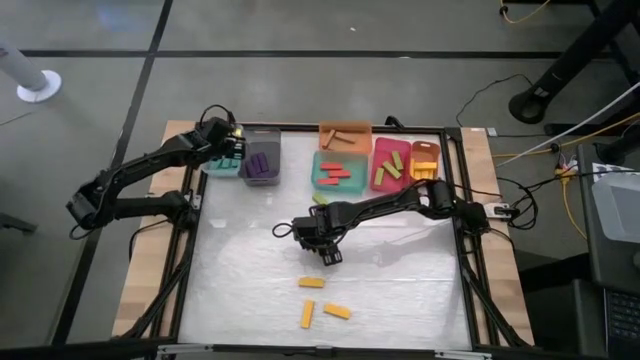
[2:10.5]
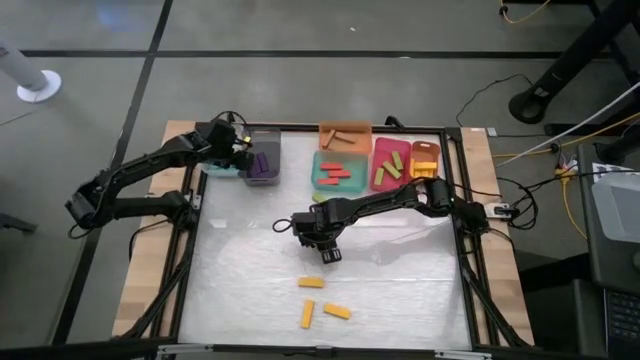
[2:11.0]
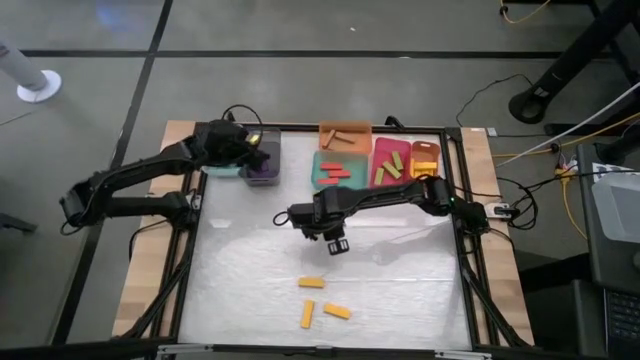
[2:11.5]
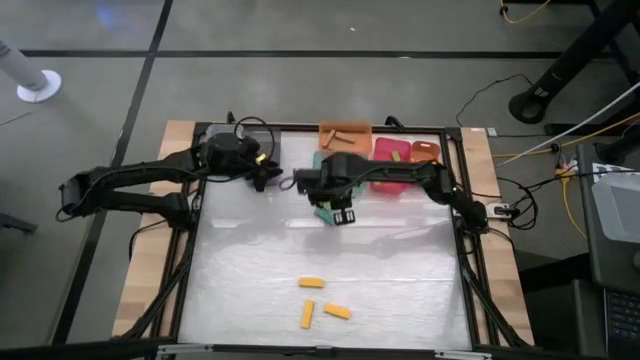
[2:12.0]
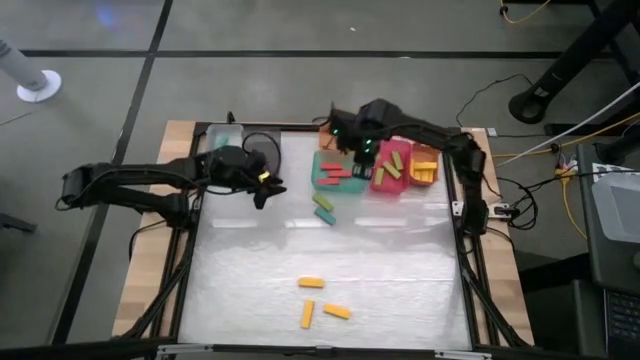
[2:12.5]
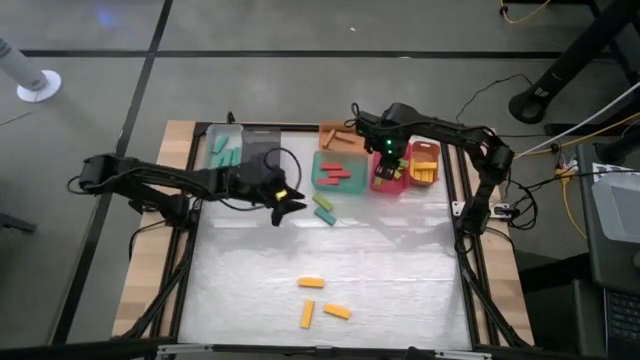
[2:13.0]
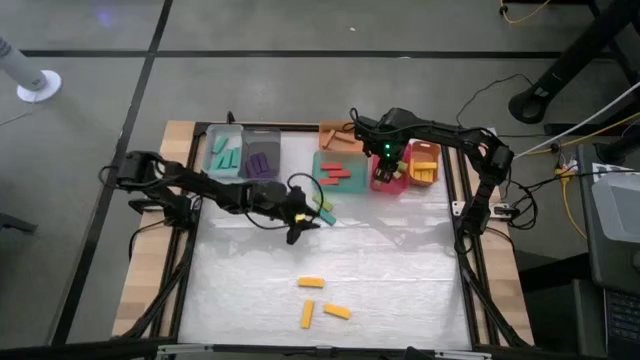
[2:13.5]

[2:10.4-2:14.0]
Task: Sort blocks
Put the light green block into the pink bin

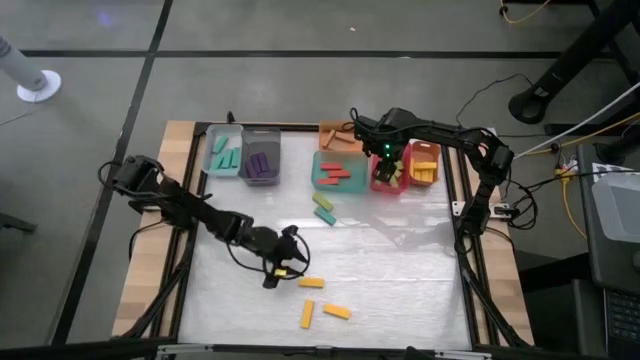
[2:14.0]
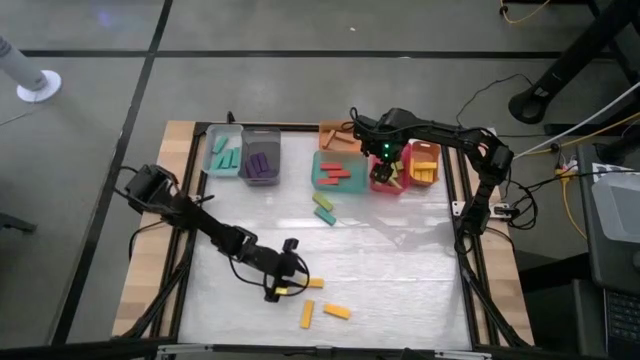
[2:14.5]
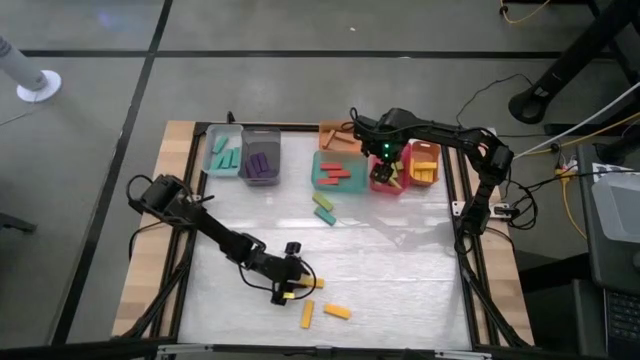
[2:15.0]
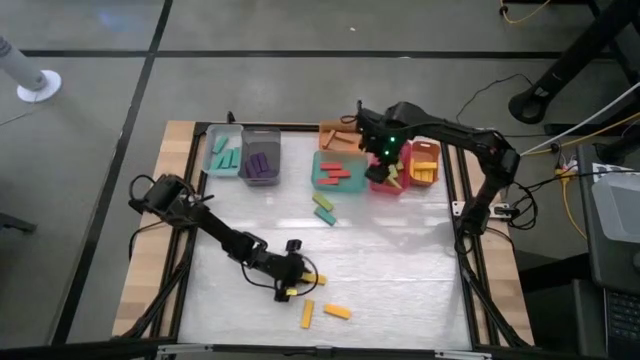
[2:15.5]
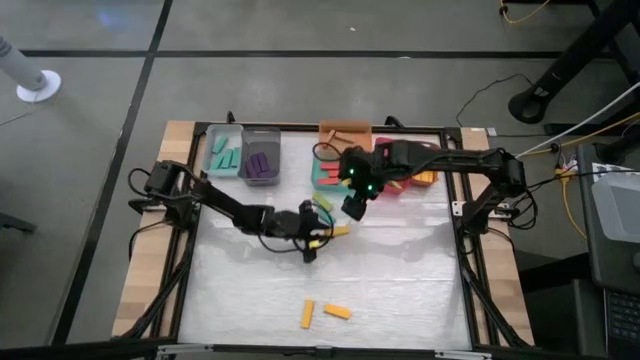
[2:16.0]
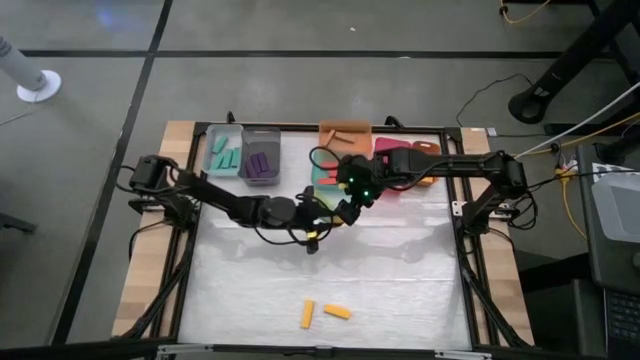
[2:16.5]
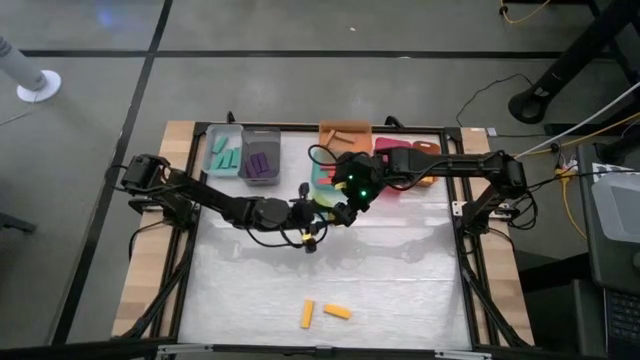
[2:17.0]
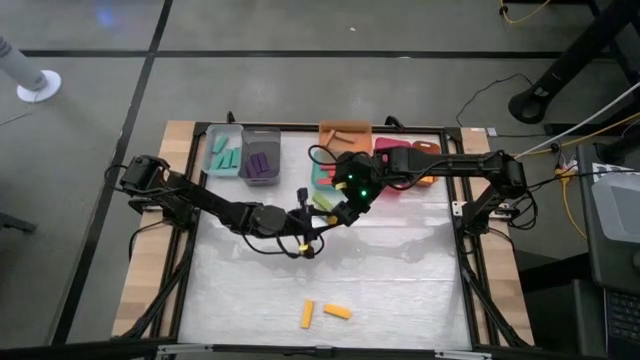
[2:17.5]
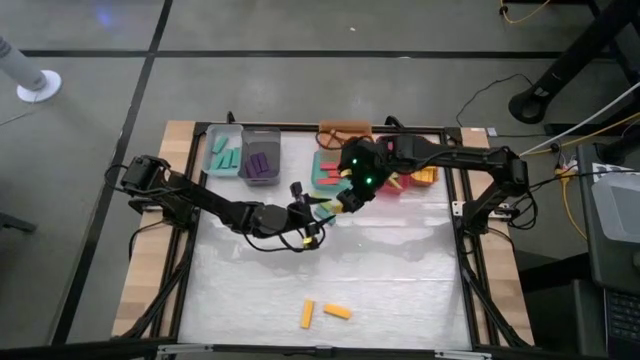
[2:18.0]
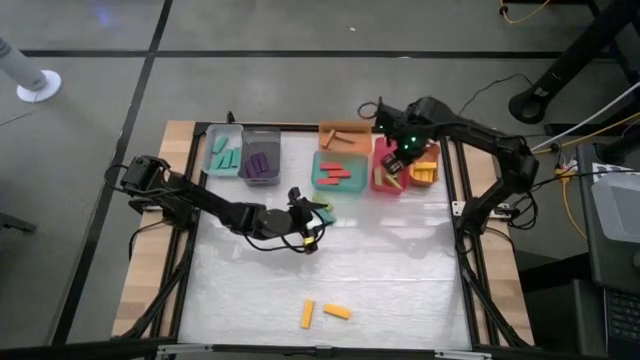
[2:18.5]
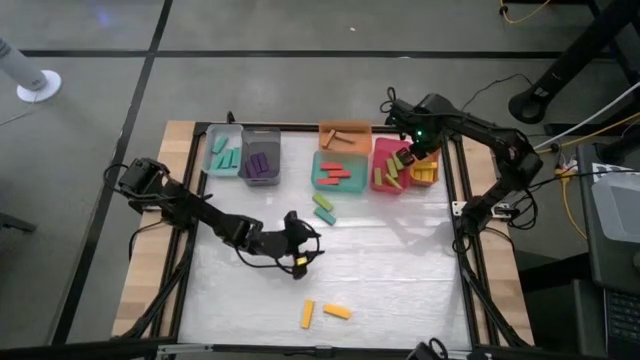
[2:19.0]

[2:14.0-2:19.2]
Put the yellow block into the right orange bin

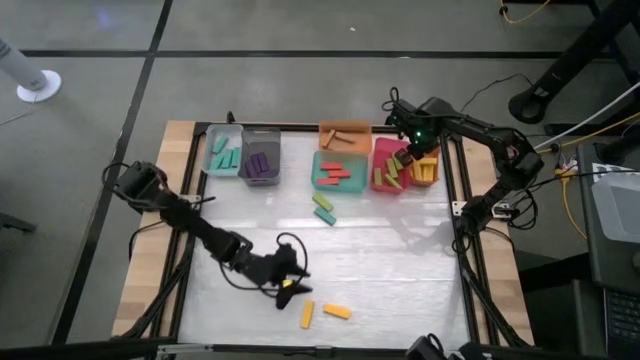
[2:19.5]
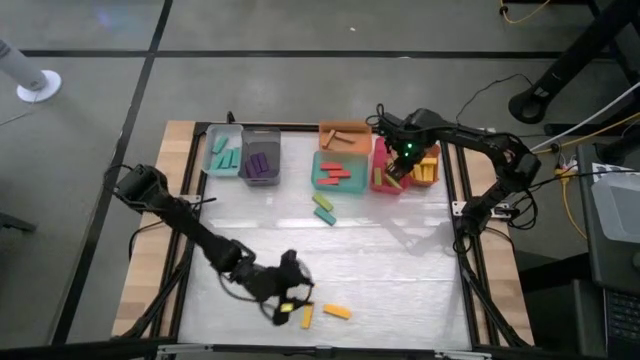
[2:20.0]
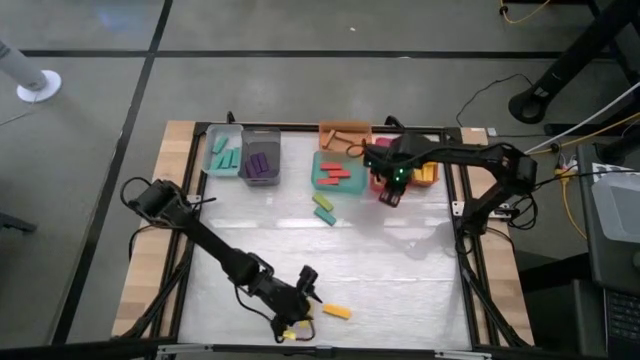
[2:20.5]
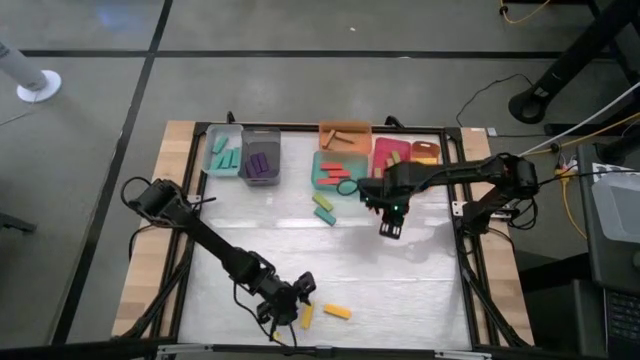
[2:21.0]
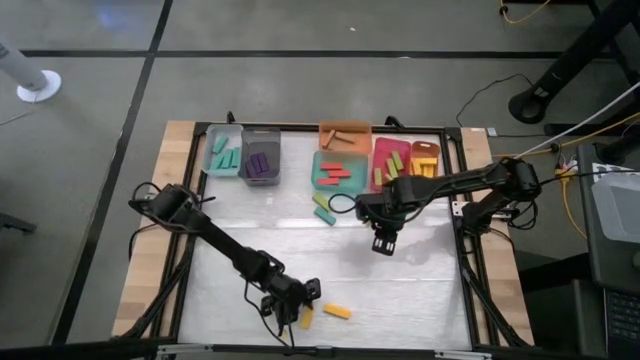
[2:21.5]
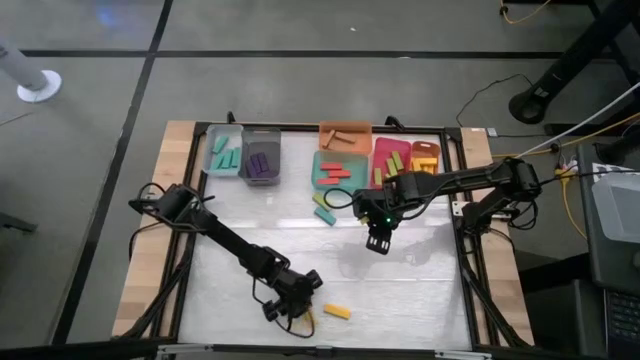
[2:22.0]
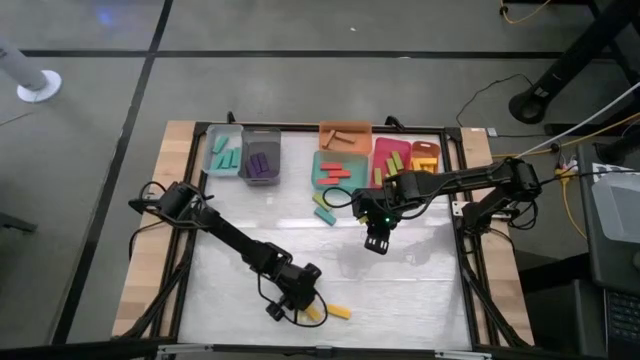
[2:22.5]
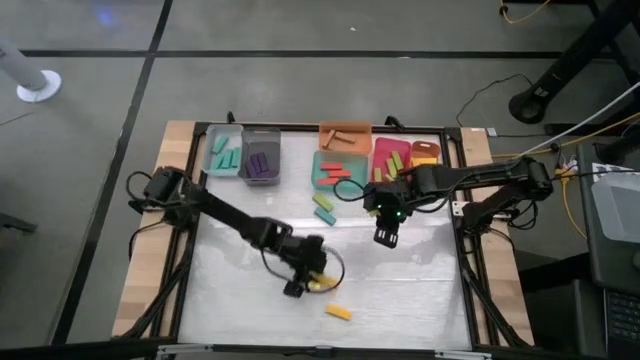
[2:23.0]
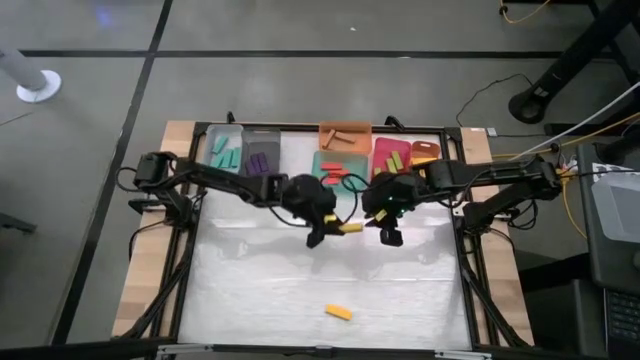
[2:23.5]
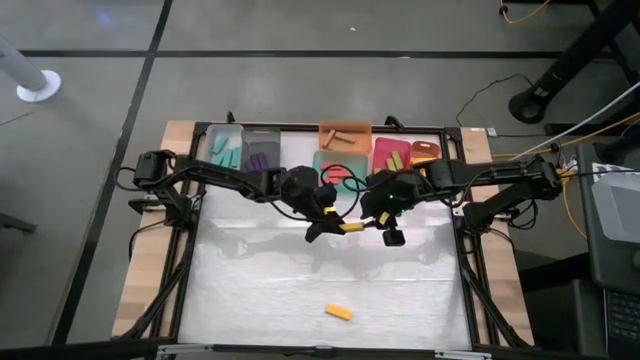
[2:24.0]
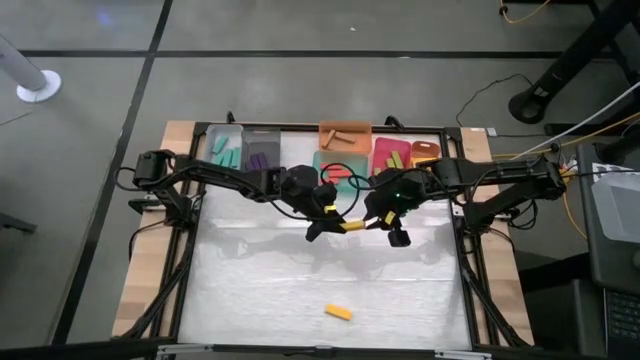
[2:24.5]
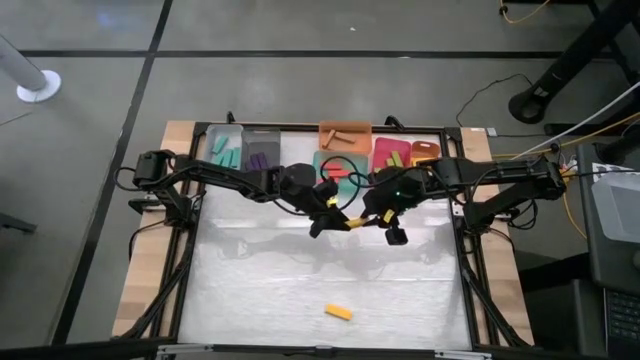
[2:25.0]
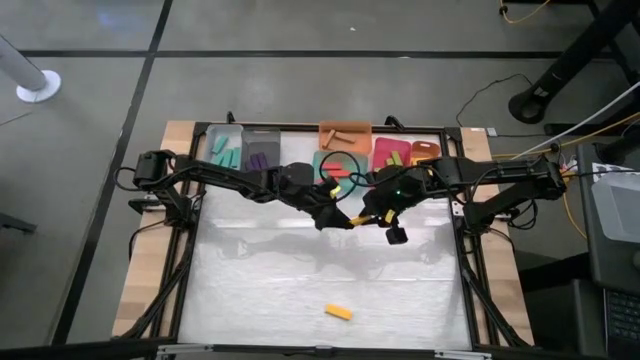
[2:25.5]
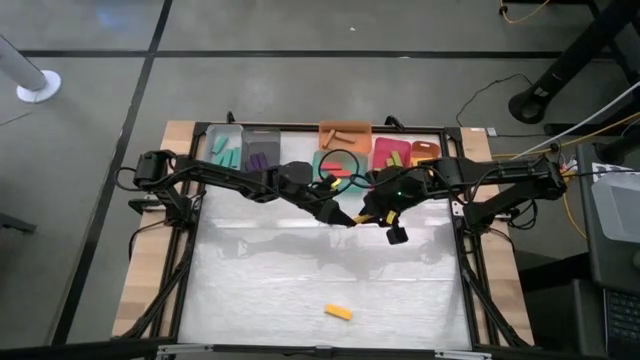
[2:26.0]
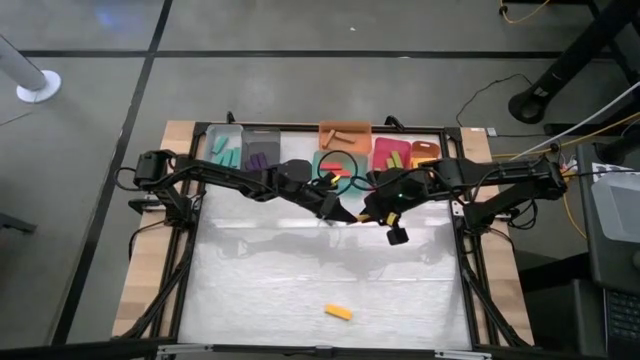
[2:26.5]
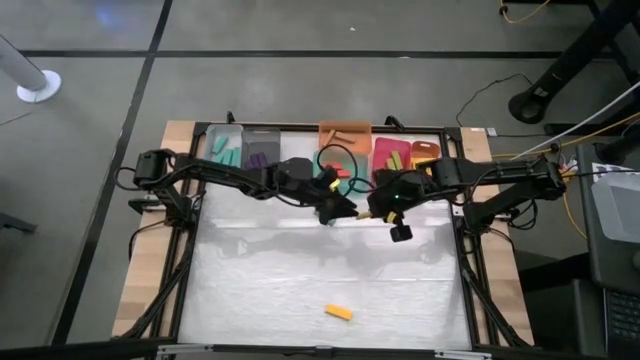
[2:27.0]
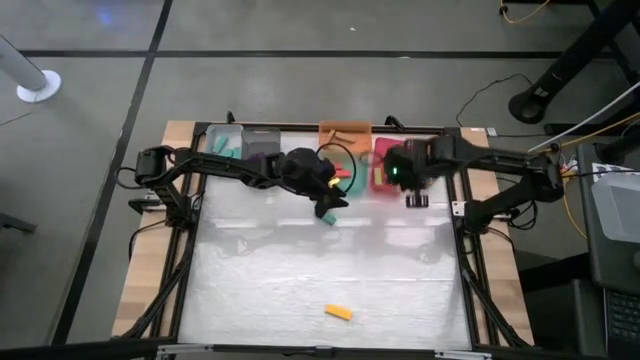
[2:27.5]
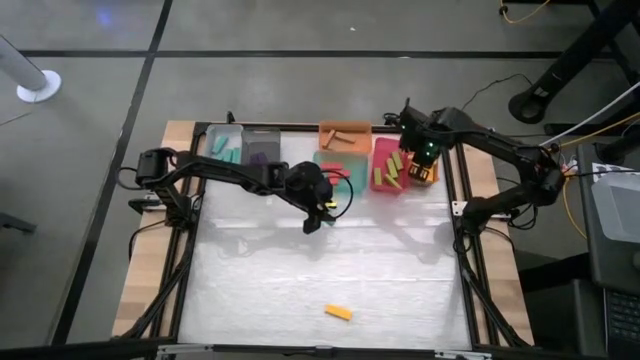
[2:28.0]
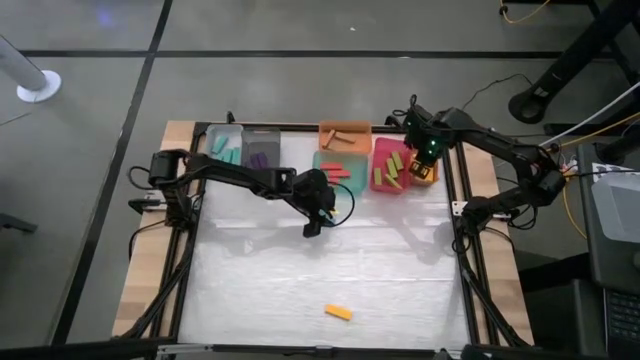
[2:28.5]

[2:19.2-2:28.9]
Put the left yellow block into the right orange bin

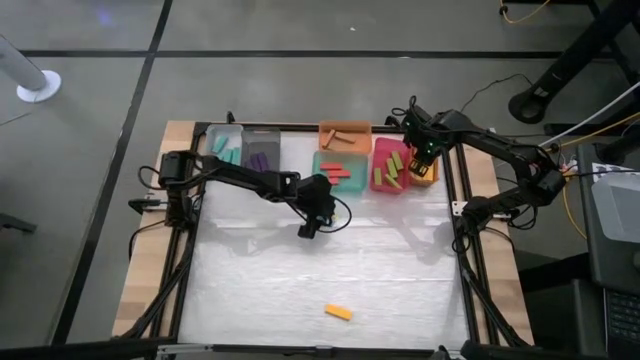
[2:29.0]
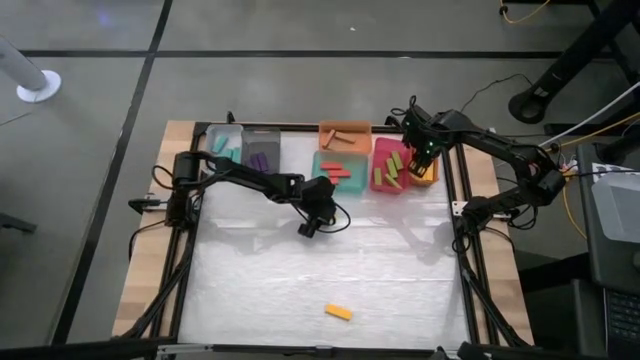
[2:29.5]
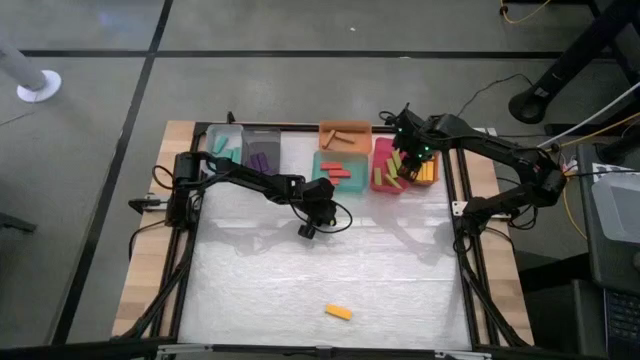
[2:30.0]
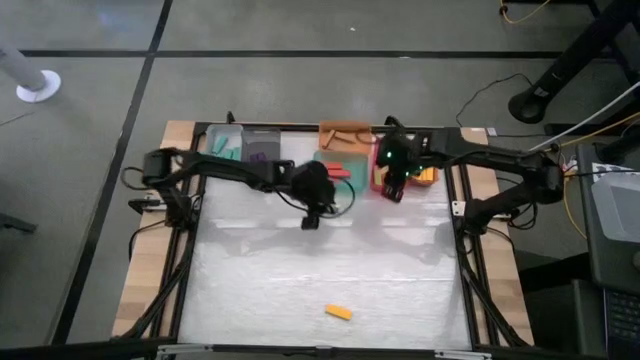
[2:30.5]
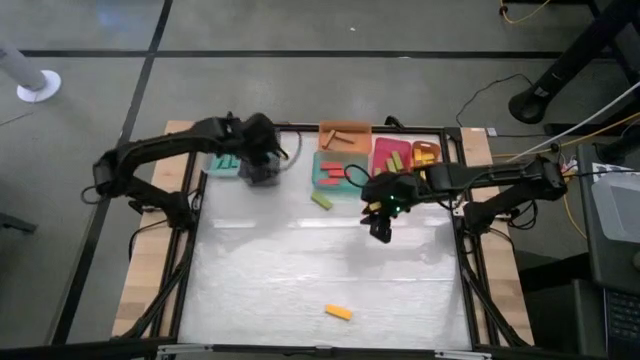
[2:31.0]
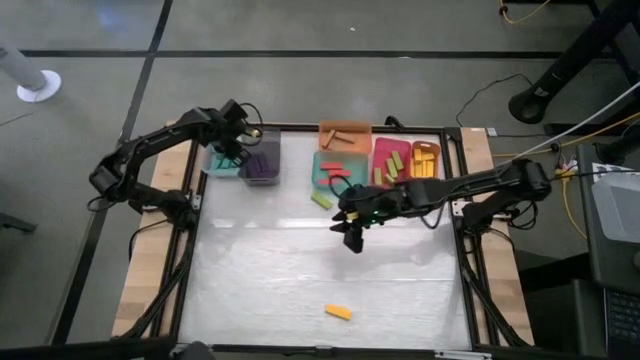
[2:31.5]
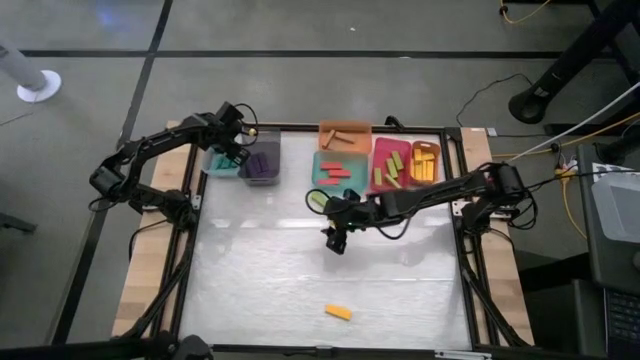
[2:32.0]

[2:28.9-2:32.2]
Put the light blue block into the transparent bin
